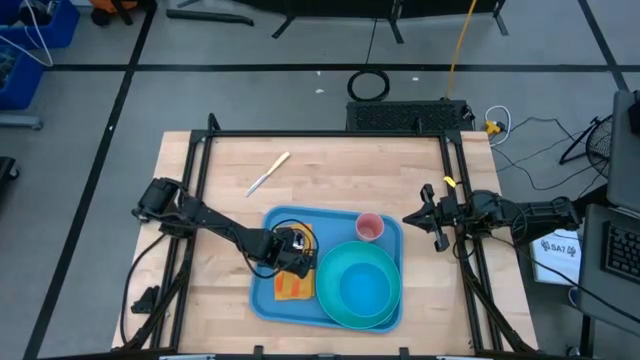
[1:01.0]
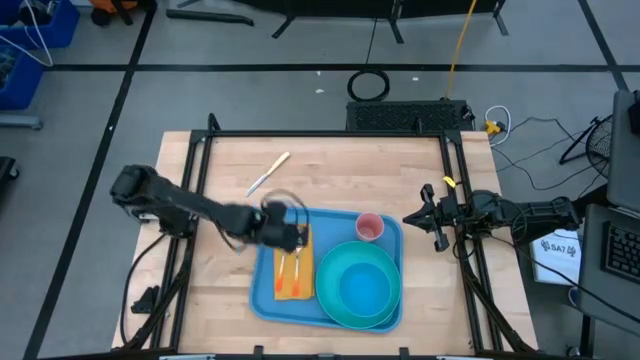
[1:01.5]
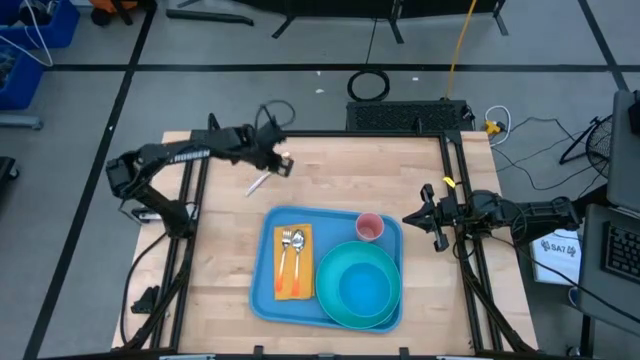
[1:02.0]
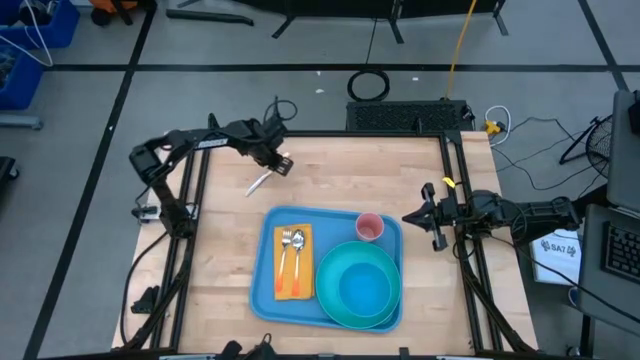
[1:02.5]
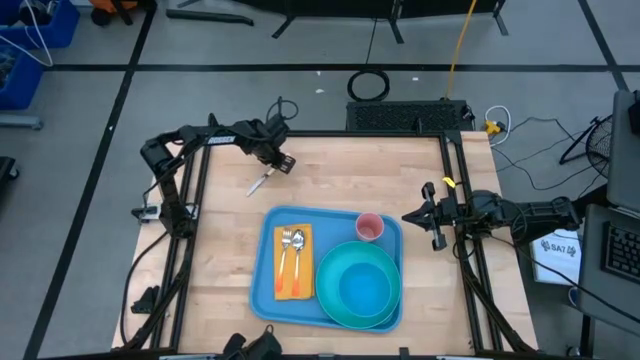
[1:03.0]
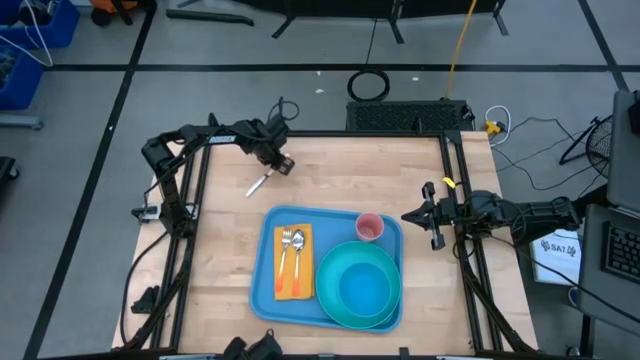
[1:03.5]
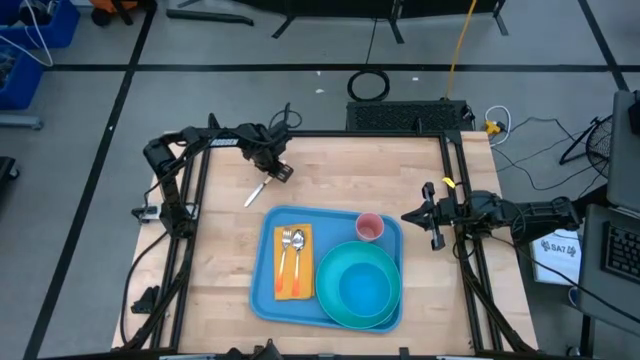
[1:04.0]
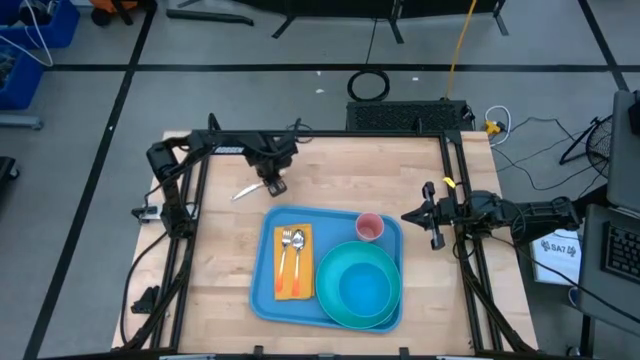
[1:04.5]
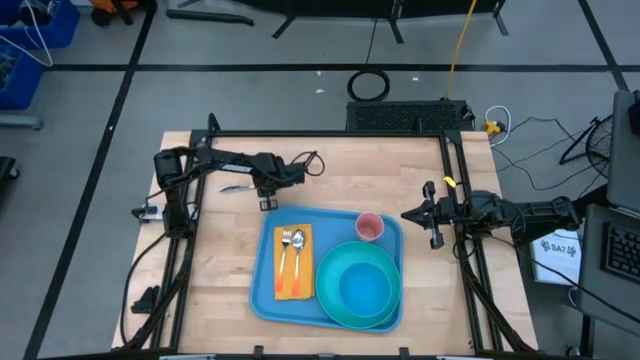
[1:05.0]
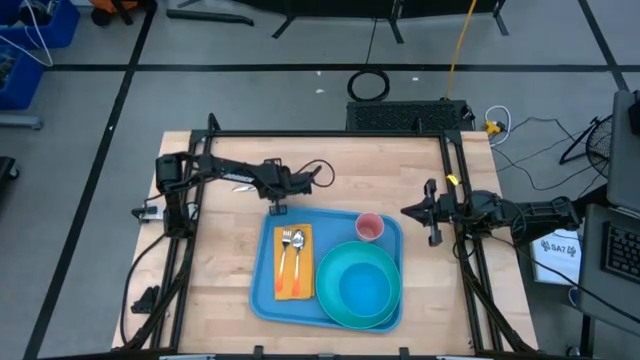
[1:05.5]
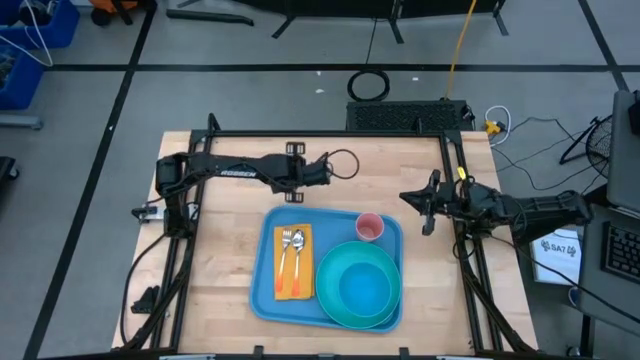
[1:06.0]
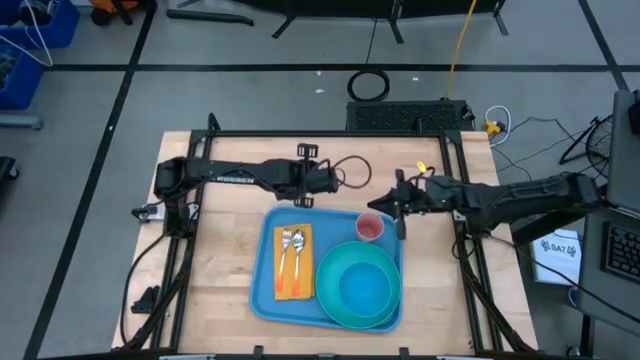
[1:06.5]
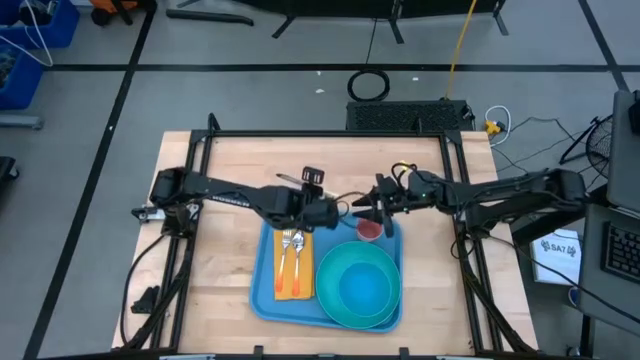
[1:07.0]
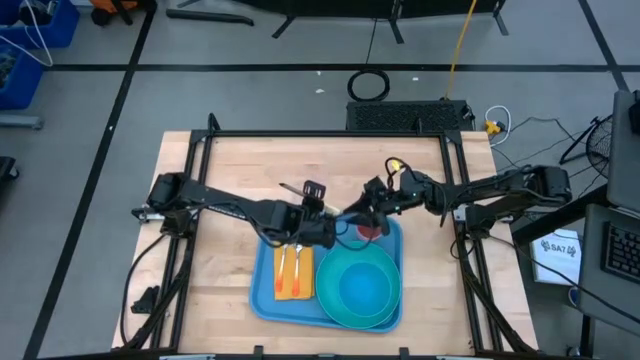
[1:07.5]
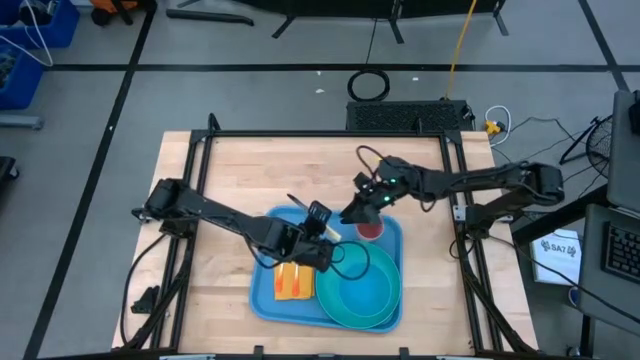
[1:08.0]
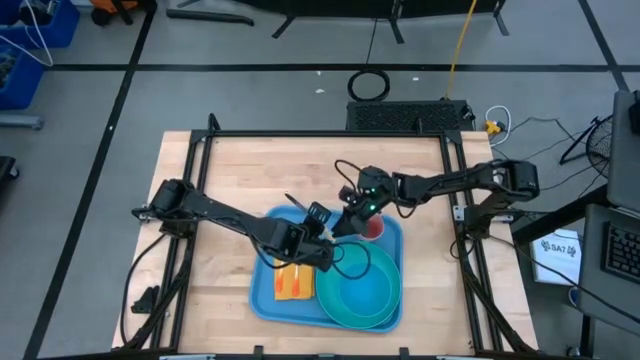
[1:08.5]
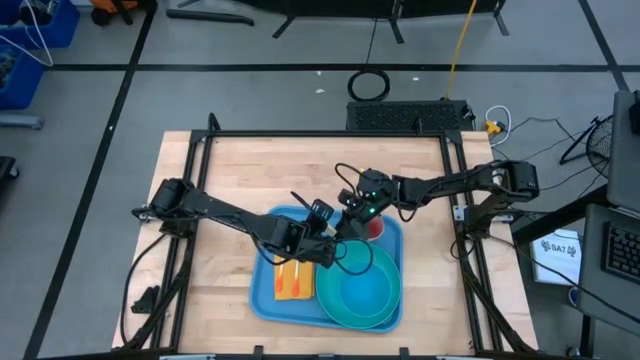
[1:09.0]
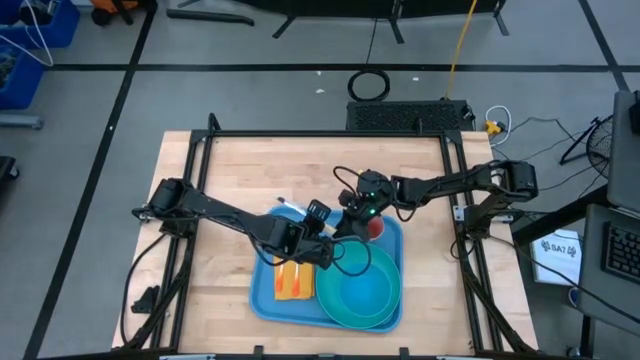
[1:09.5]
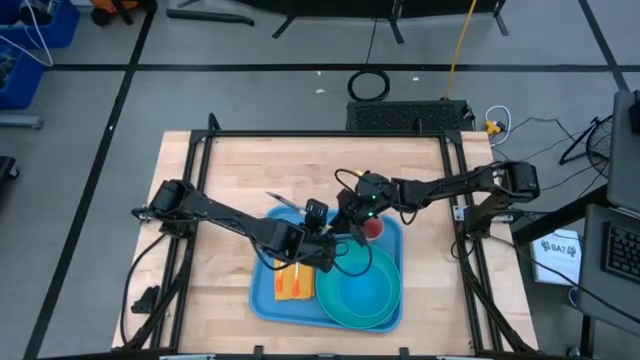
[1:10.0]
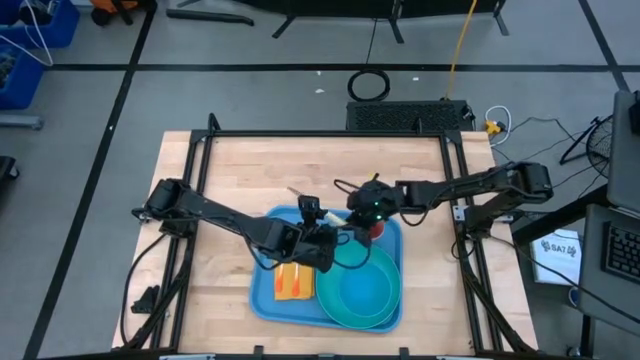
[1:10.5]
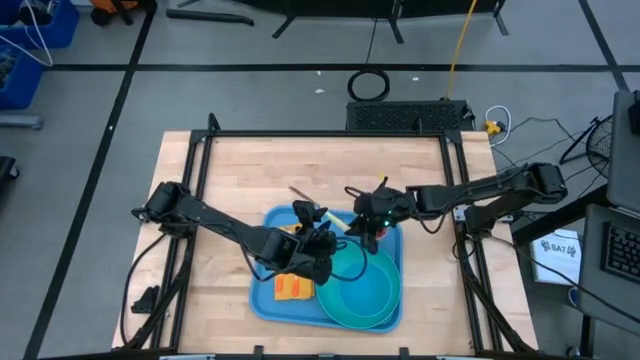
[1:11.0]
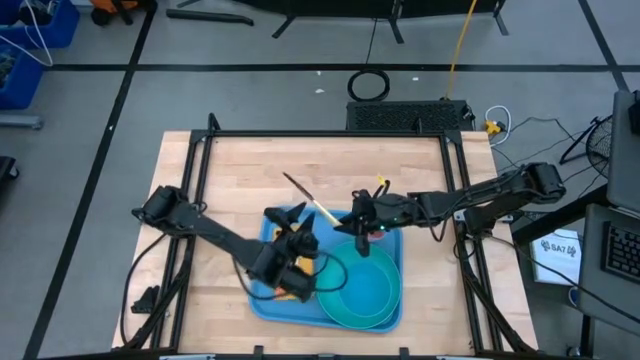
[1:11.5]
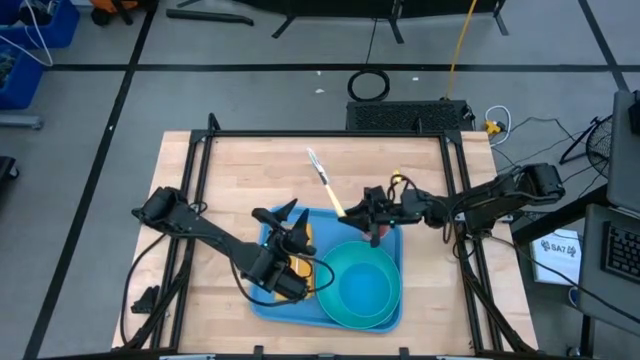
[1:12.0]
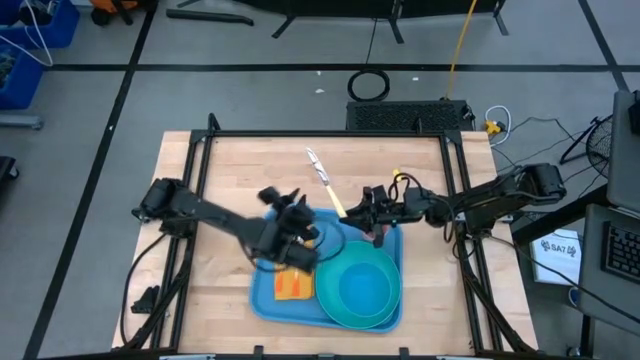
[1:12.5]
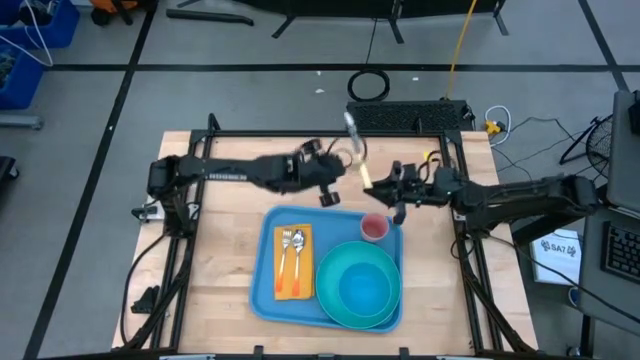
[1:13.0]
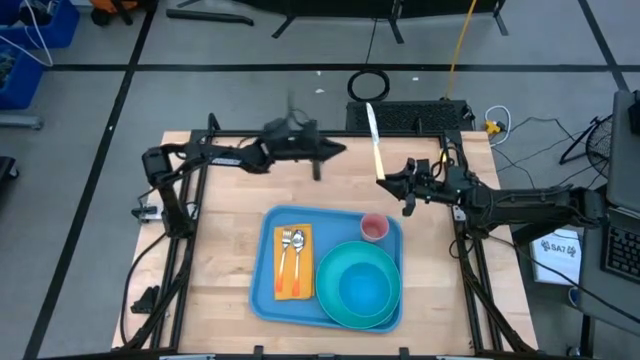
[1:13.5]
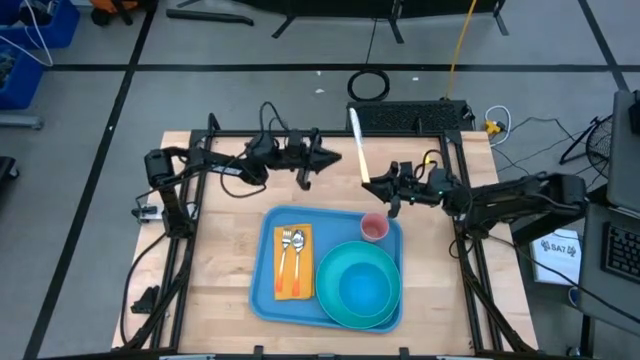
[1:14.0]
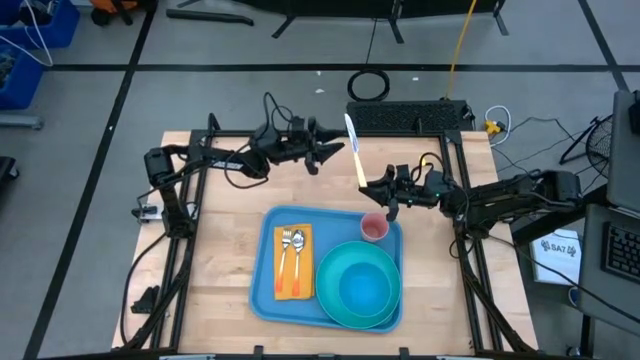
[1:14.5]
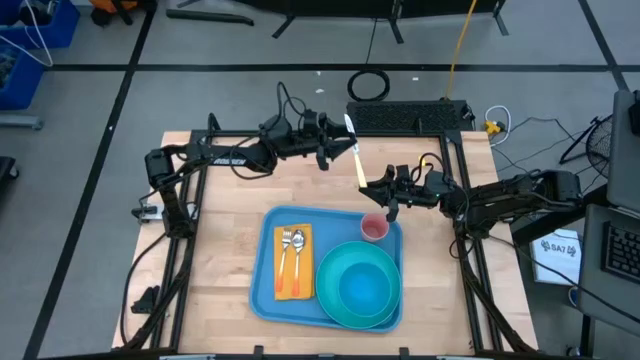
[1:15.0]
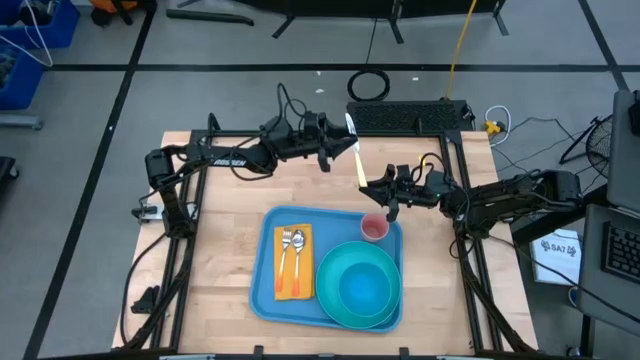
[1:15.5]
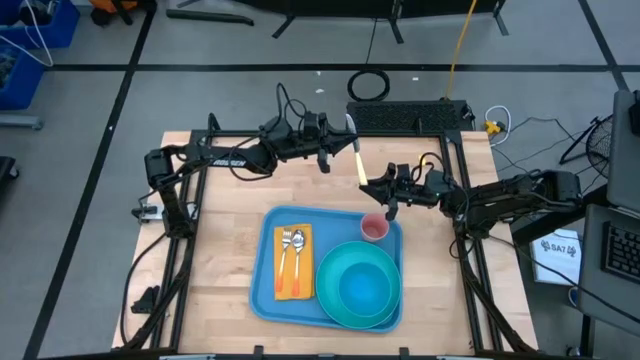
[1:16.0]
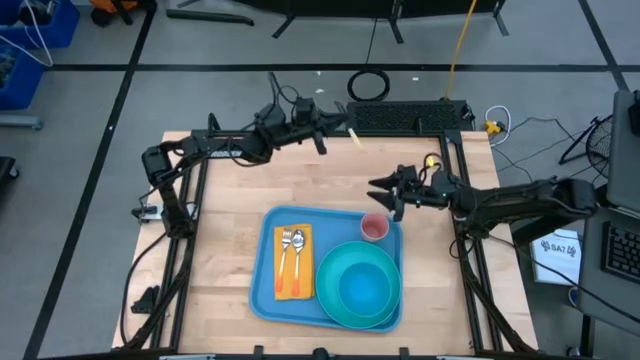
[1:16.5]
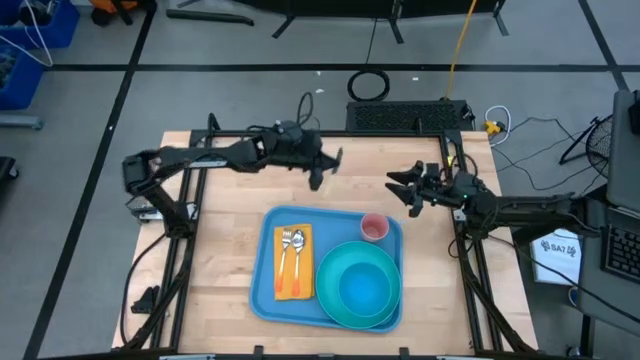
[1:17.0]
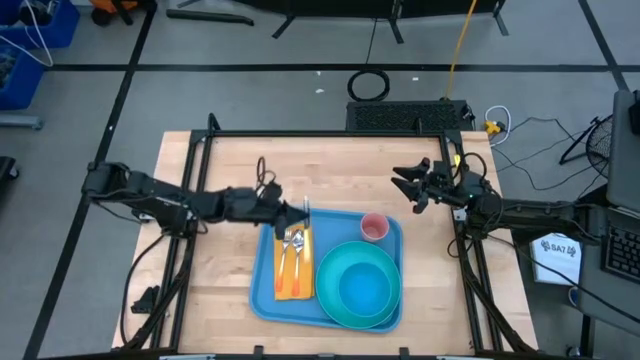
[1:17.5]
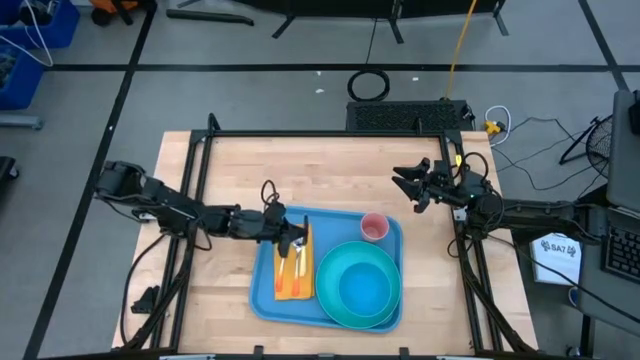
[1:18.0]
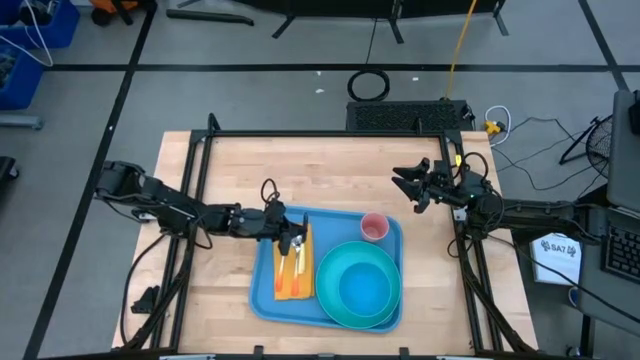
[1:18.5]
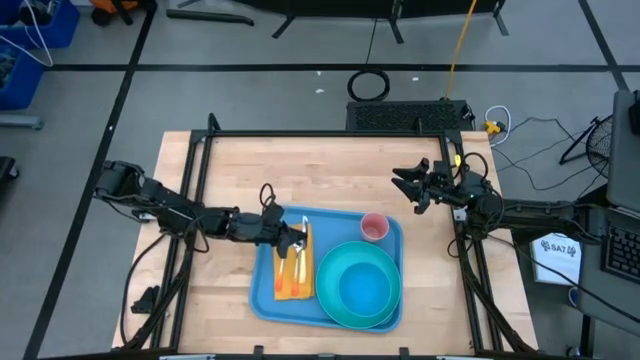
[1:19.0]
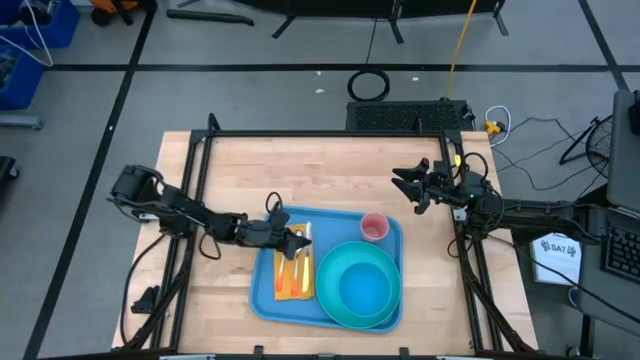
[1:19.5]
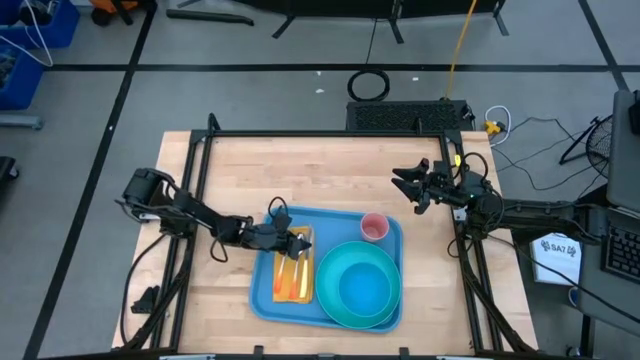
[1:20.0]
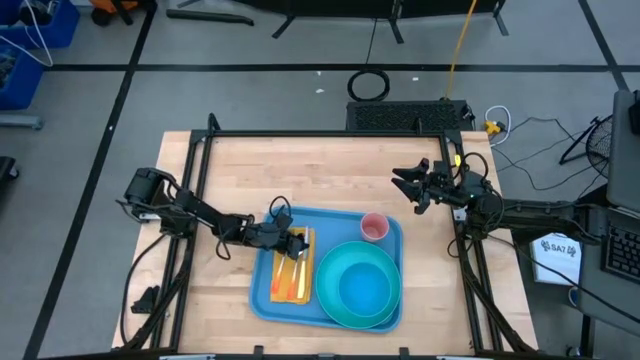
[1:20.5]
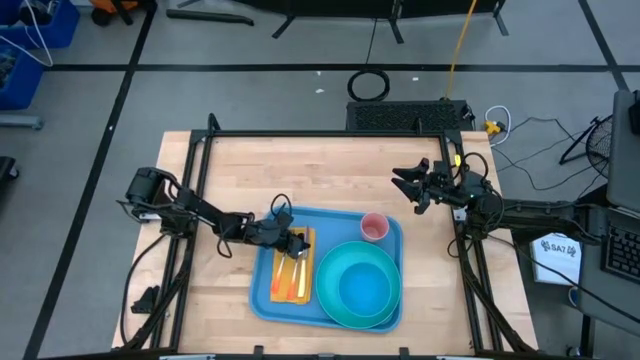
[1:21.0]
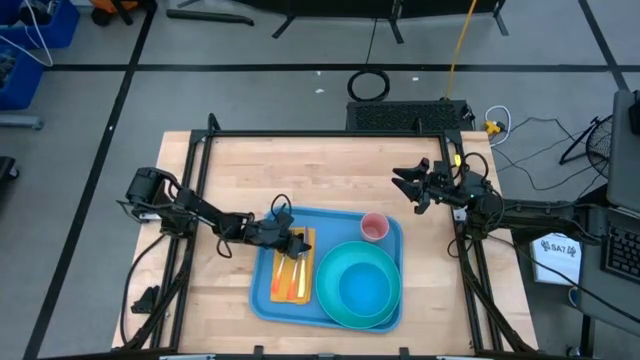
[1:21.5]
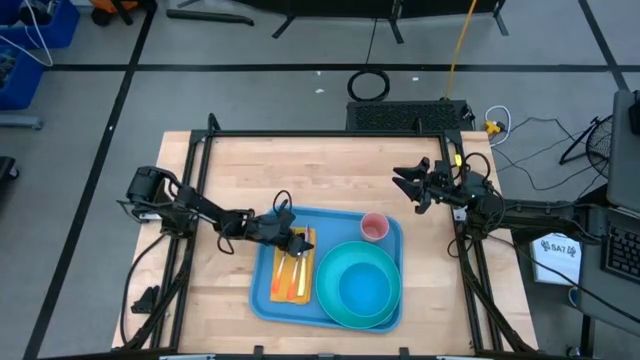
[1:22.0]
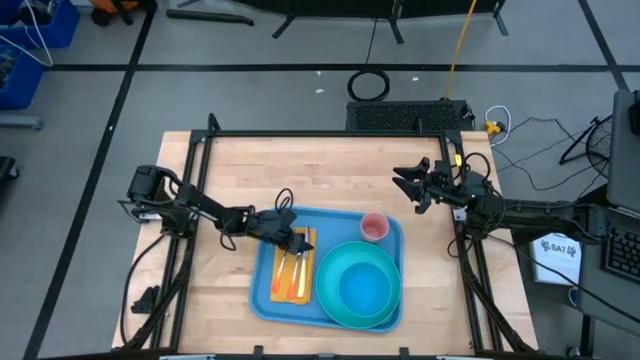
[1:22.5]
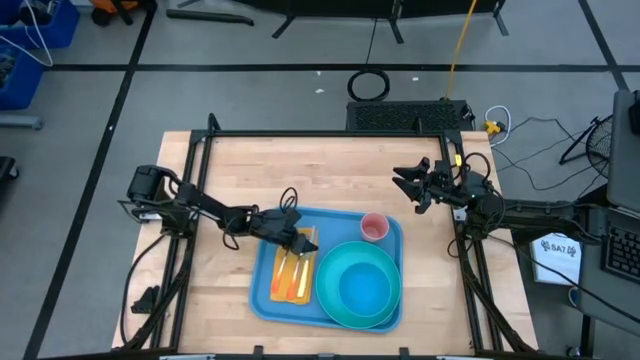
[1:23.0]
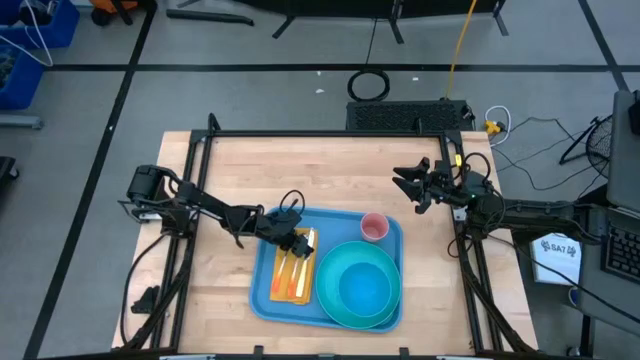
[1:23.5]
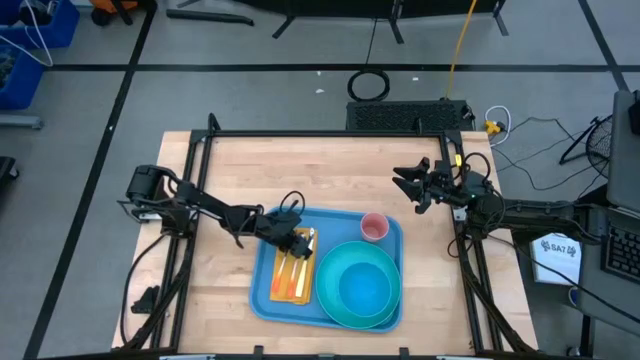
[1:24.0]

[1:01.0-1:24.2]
Task: Set up tray
Put the yellow knife on top of the yellow napkin to the right of the orange spoon
